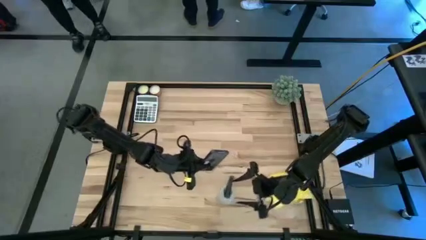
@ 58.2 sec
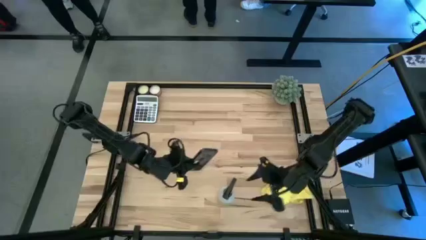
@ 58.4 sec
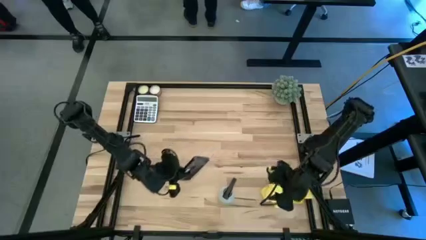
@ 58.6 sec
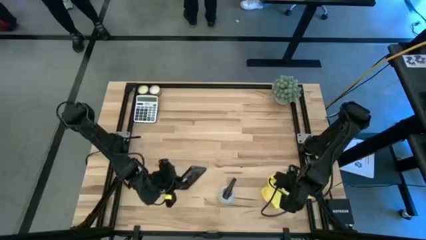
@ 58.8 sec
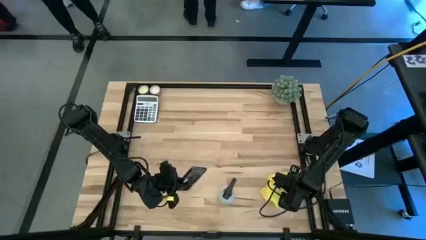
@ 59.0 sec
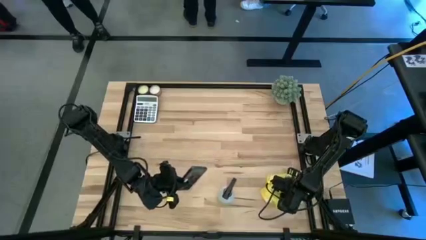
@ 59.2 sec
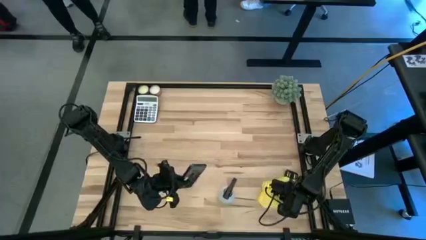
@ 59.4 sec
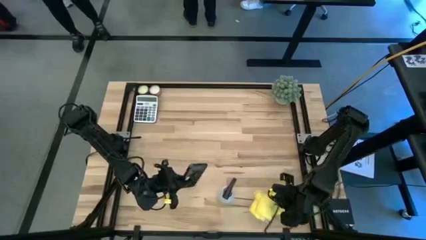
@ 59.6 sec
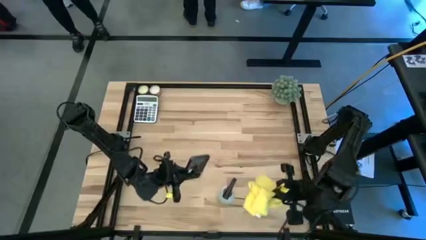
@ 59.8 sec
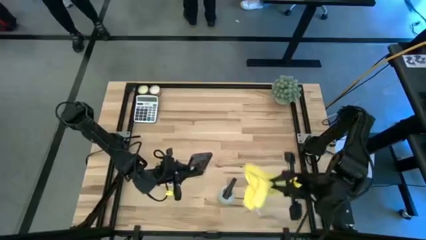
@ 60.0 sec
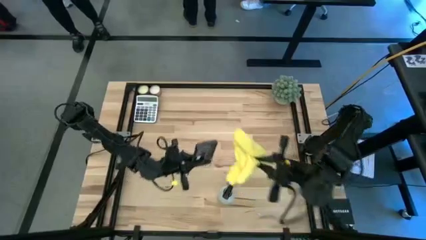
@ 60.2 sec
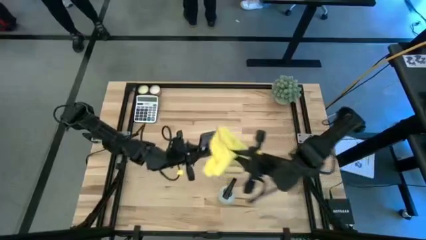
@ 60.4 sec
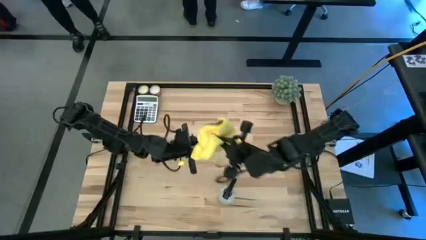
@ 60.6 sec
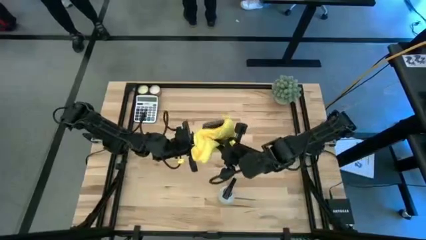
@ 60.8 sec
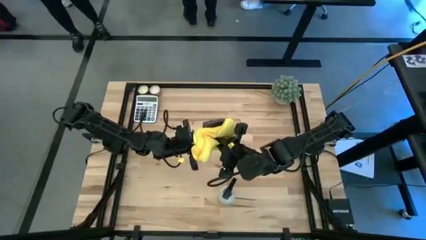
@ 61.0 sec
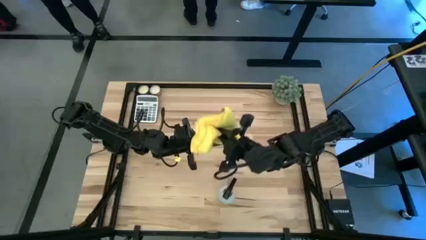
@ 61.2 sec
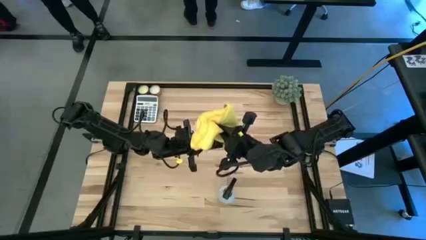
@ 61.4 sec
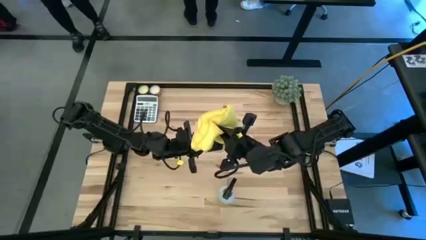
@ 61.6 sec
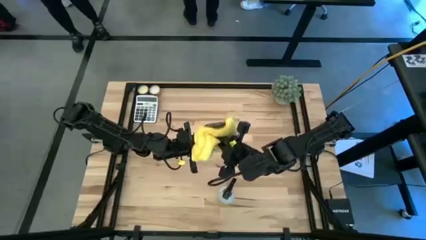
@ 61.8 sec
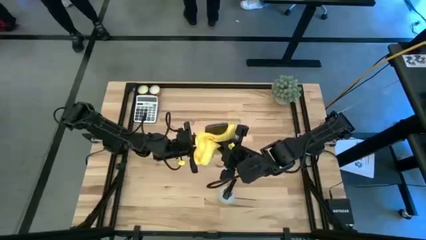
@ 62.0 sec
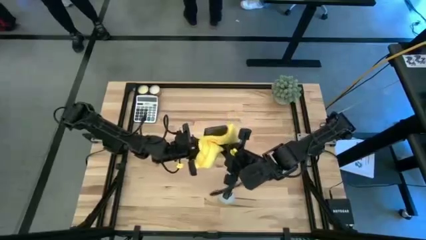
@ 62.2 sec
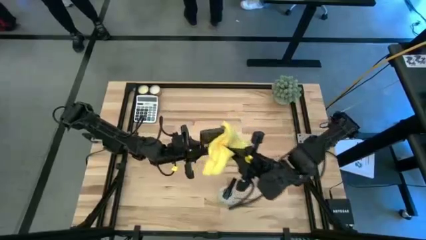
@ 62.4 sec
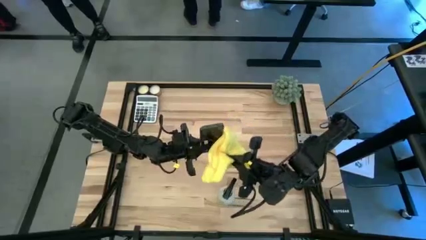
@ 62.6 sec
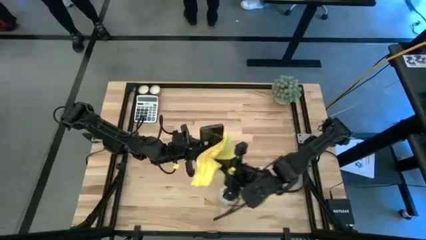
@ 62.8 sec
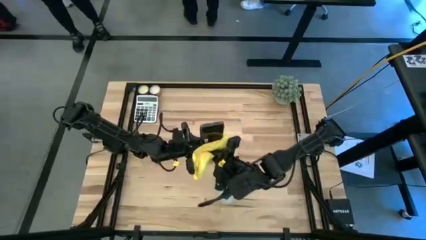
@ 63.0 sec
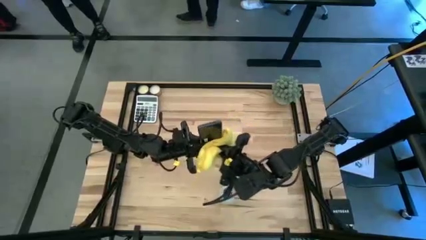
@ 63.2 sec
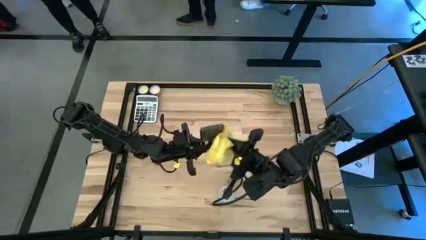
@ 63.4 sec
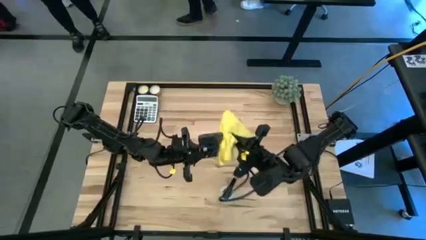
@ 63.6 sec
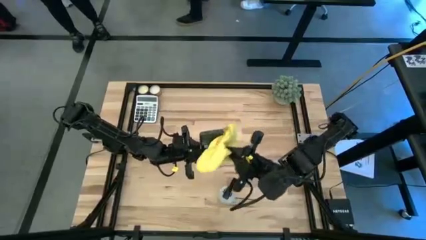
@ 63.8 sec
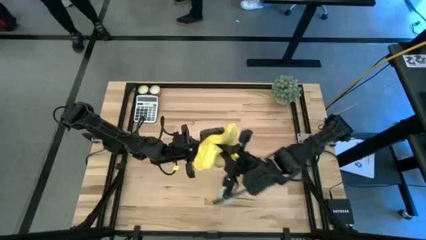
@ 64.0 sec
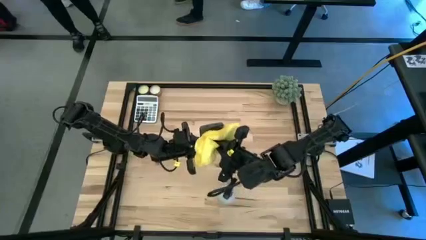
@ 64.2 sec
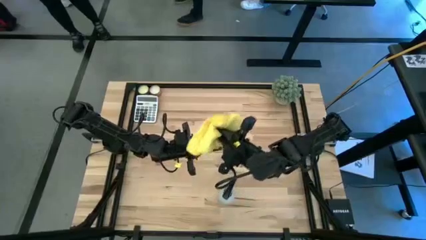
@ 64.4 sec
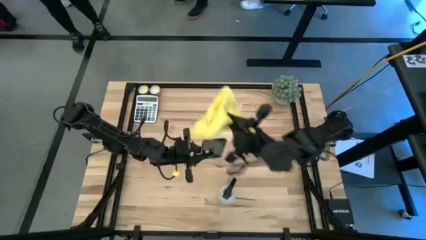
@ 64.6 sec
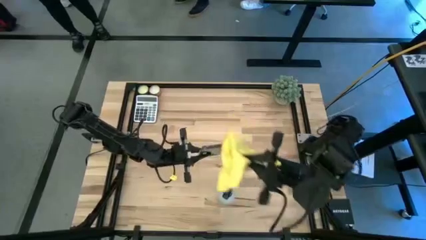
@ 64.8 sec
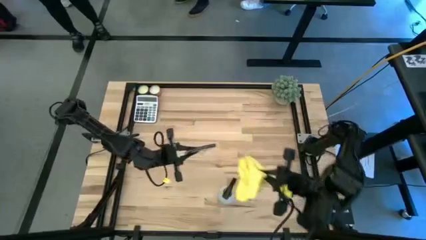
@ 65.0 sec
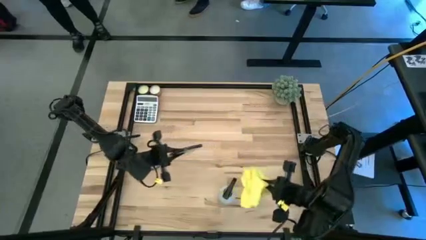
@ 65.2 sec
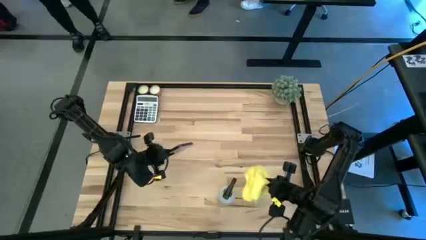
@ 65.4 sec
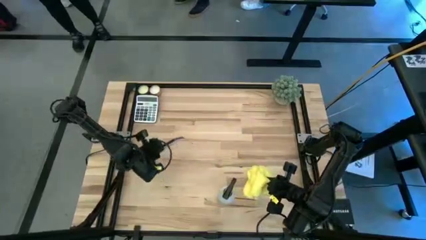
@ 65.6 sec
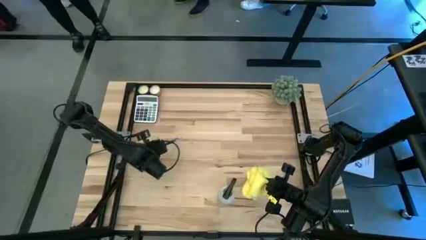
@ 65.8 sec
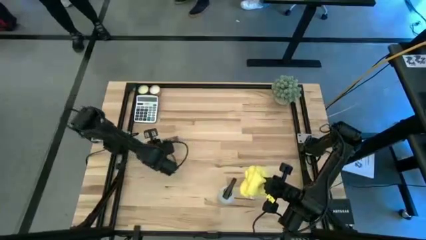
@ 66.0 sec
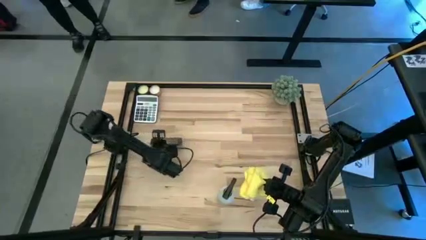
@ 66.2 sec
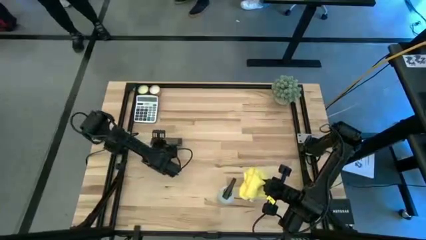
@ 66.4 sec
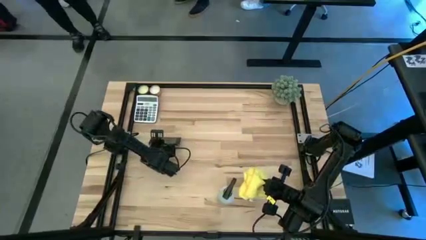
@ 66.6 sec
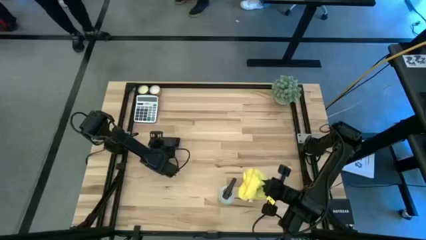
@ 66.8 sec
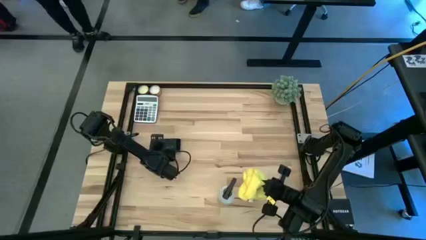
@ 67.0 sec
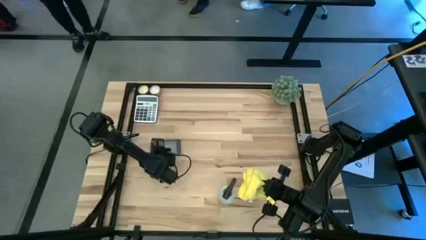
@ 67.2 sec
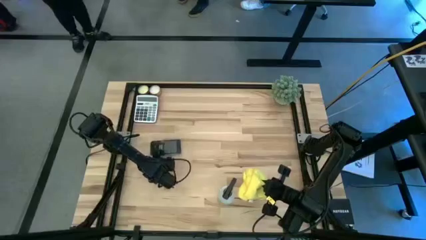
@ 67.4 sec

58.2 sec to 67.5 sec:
Task: Apply microfiber cloth
Wipe the back screen of the black cellphone using a yellow microfiber cloth

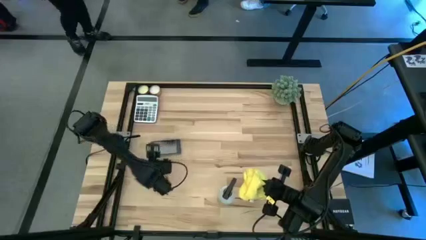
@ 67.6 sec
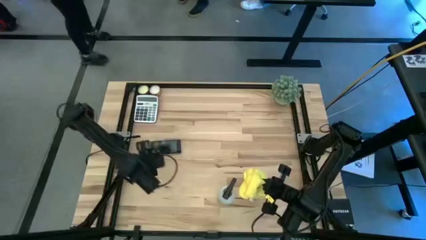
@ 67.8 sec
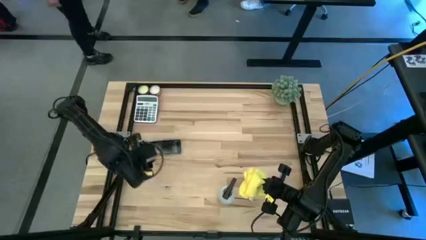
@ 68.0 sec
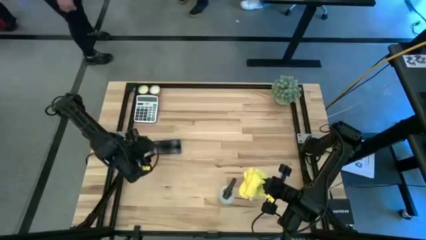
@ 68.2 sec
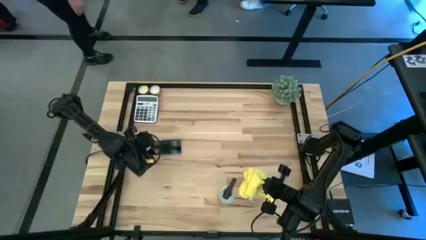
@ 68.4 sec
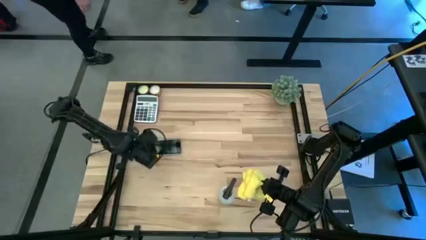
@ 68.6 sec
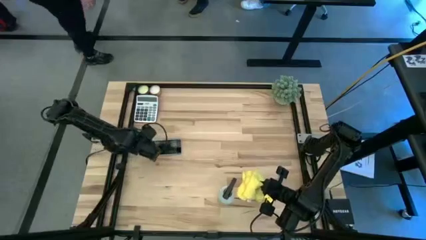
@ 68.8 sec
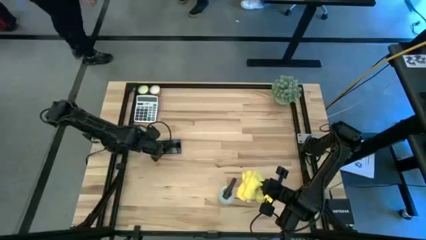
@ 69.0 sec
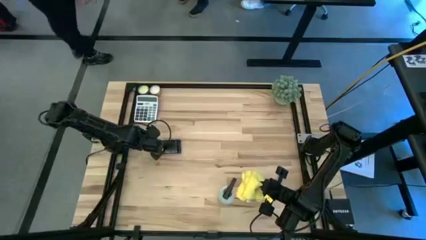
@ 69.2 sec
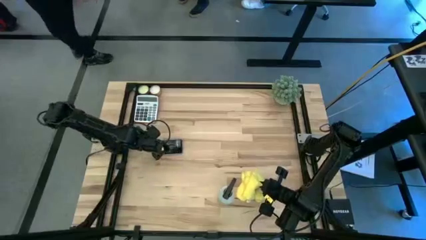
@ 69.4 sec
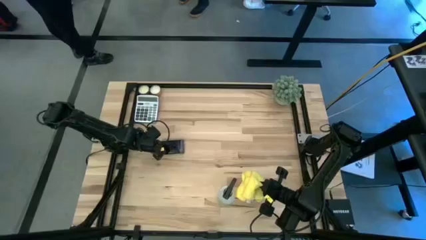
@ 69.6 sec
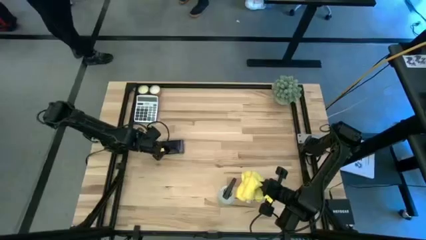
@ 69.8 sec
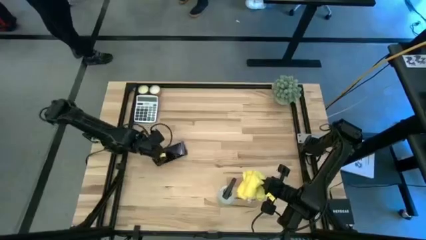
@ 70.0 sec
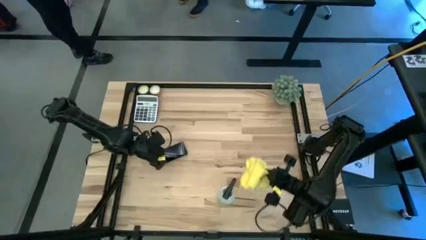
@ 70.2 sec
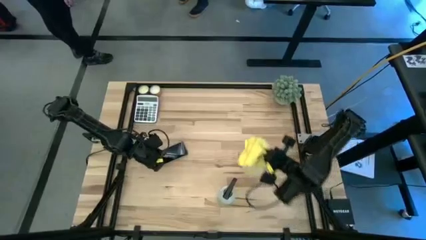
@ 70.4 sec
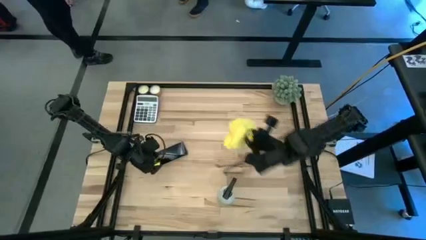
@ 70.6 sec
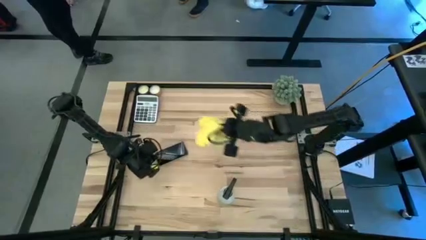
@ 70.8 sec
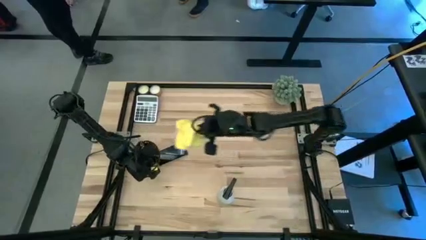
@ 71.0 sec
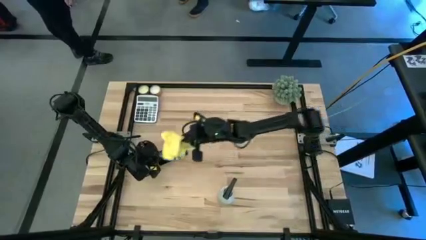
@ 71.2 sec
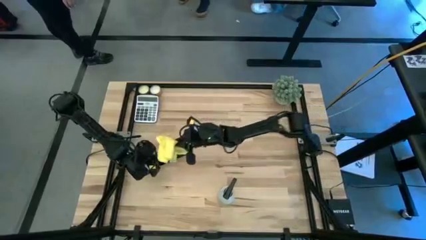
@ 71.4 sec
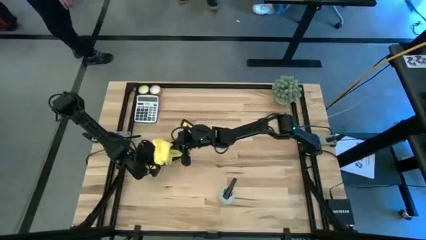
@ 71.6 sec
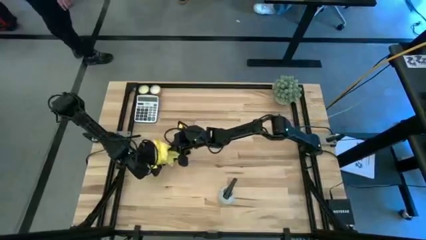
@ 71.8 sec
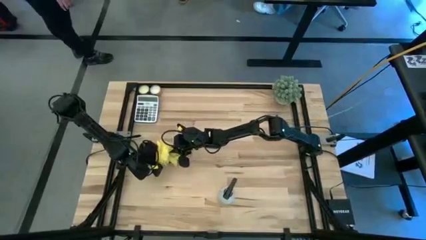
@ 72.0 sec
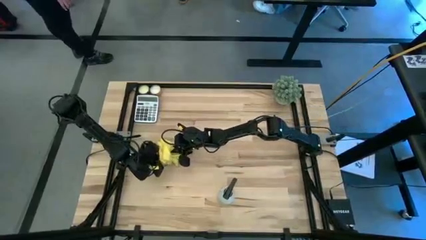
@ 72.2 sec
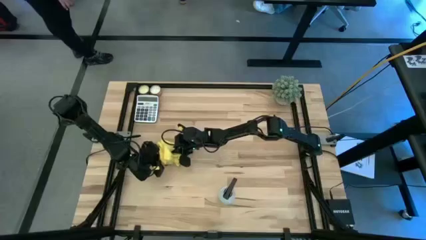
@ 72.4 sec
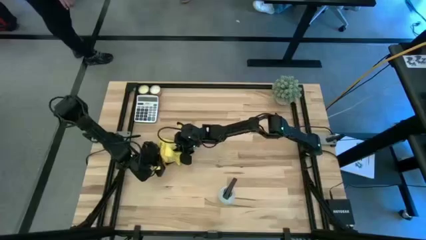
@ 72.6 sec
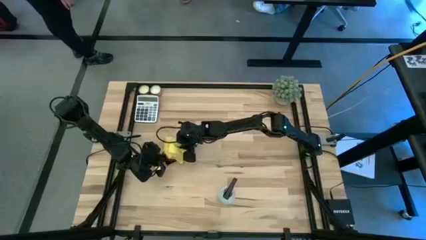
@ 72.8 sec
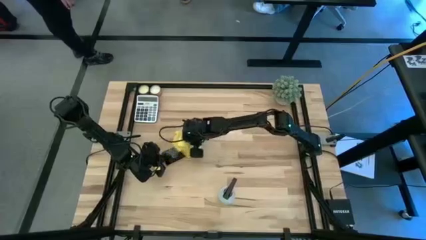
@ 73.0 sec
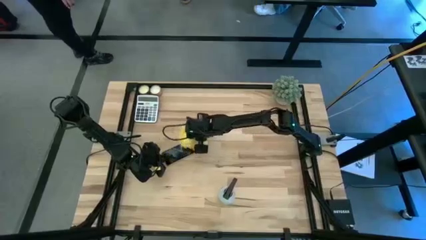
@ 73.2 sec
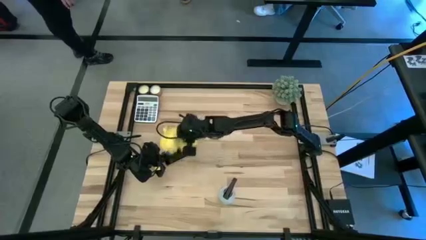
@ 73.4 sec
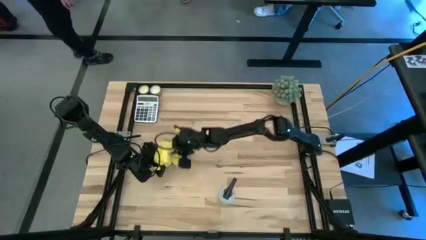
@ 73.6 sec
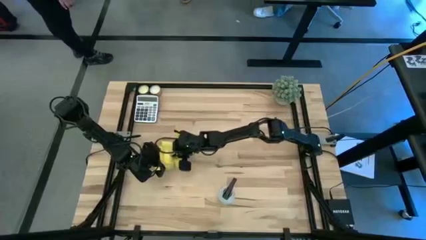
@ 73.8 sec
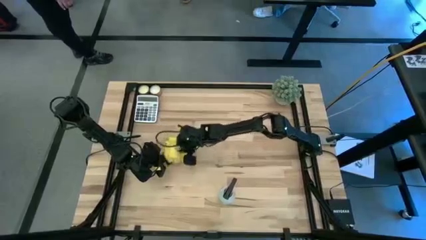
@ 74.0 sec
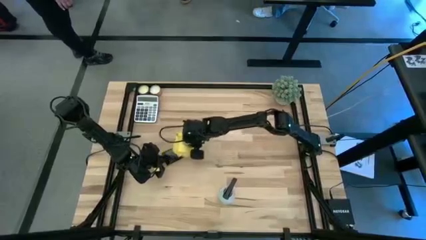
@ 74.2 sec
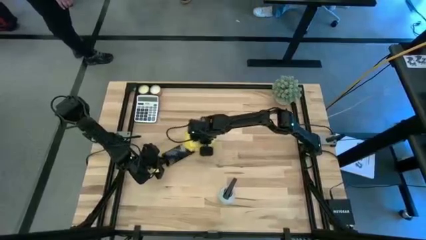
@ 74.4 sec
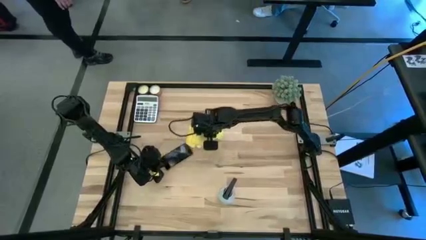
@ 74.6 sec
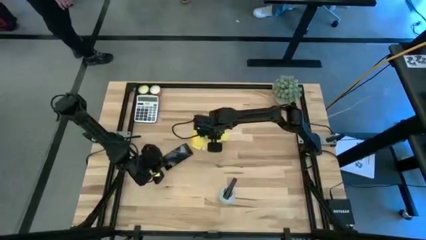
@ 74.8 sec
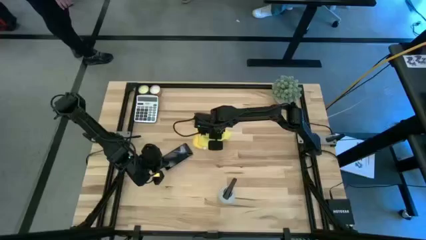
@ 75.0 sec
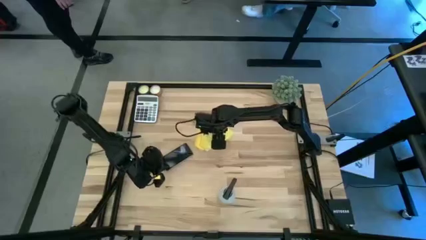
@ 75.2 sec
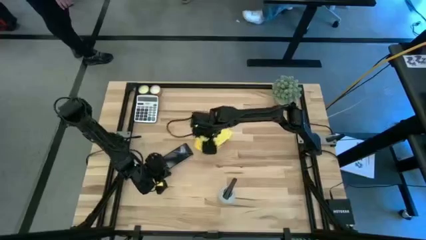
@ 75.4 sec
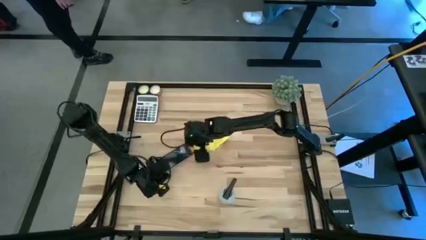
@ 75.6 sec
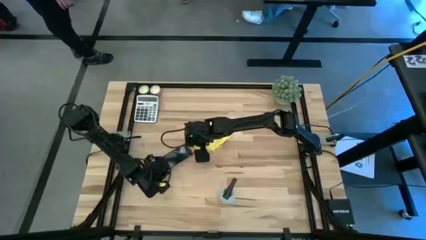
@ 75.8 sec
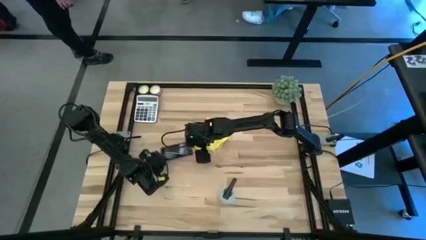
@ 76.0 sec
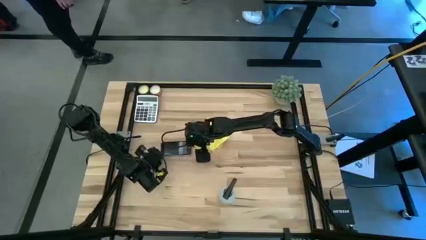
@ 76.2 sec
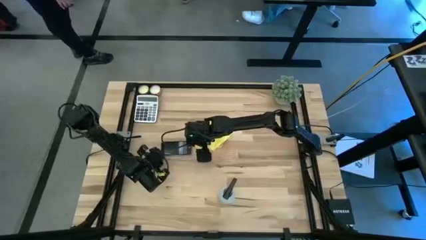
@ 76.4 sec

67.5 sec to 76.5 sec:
Wipe the front screen of the black cellphone using a yellow microfiber cloth
